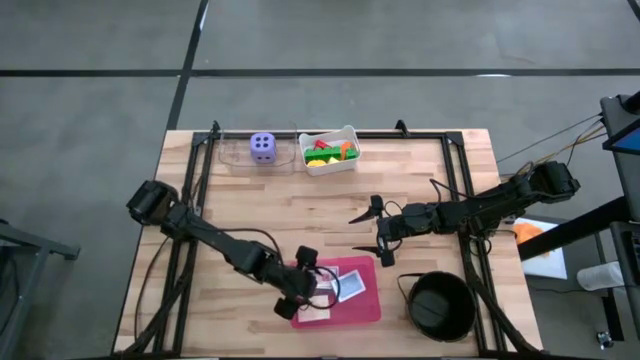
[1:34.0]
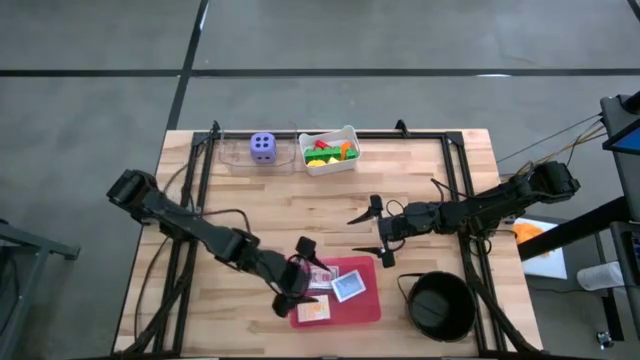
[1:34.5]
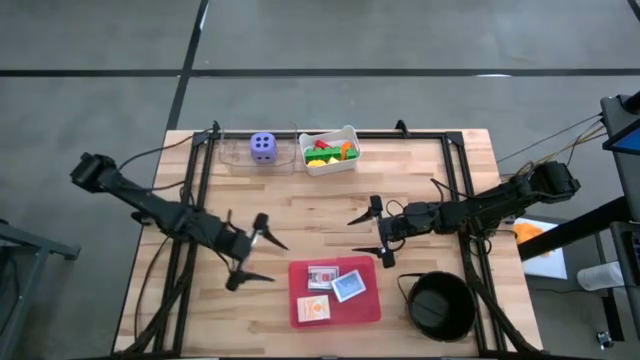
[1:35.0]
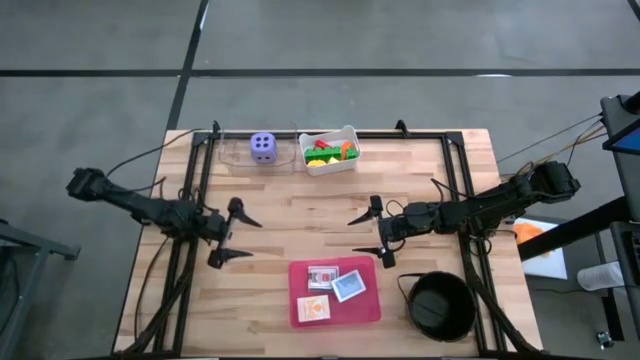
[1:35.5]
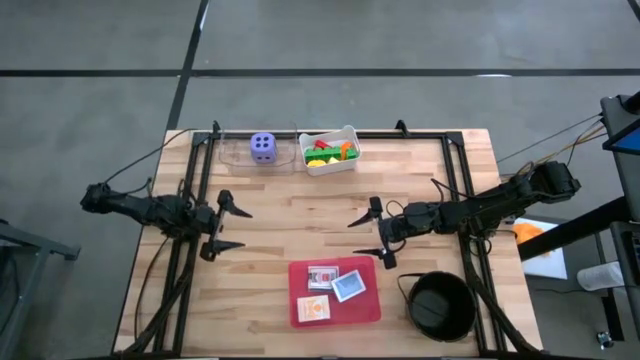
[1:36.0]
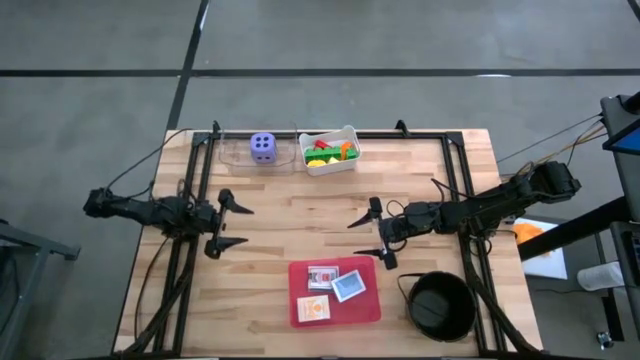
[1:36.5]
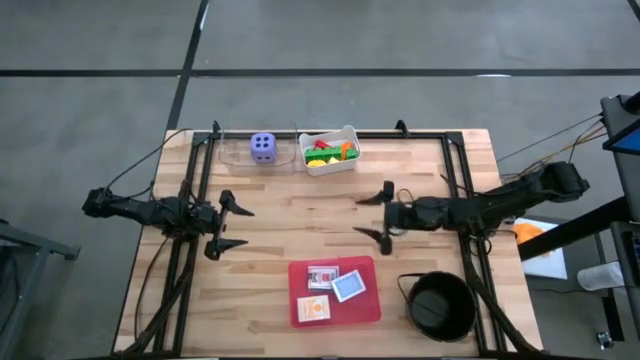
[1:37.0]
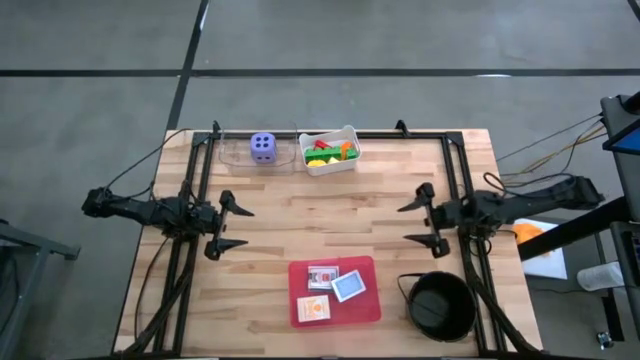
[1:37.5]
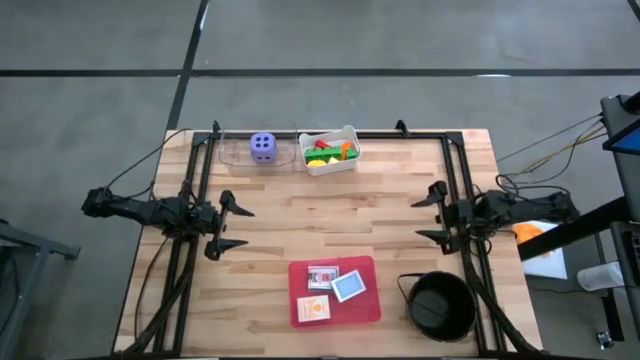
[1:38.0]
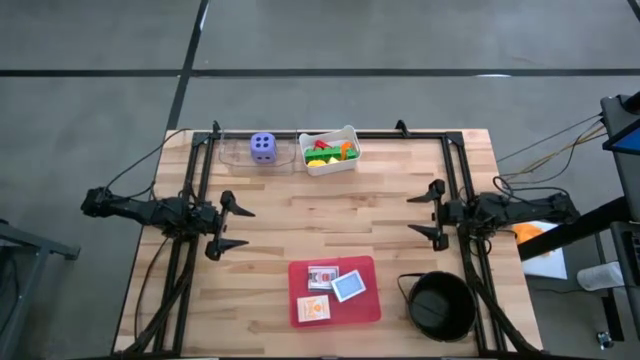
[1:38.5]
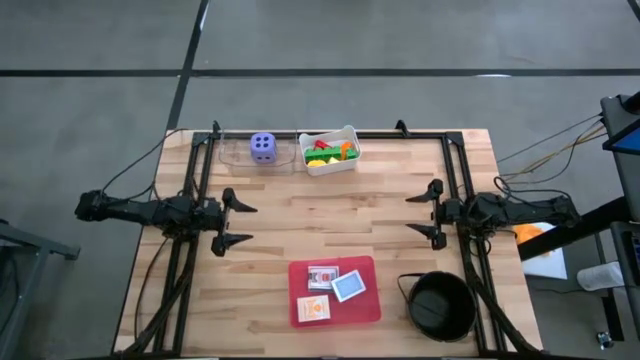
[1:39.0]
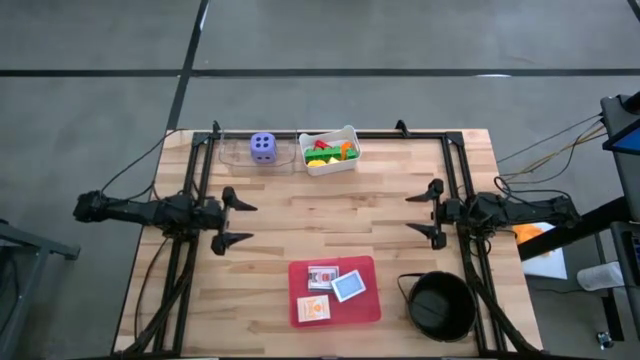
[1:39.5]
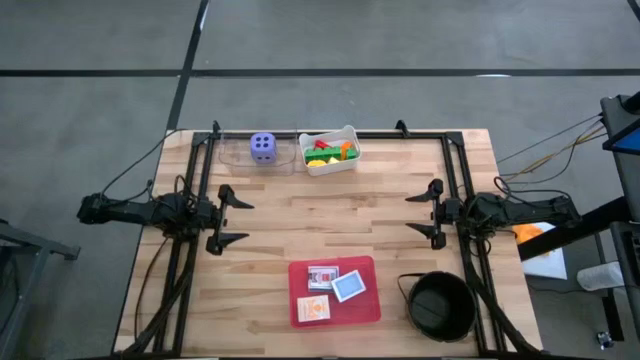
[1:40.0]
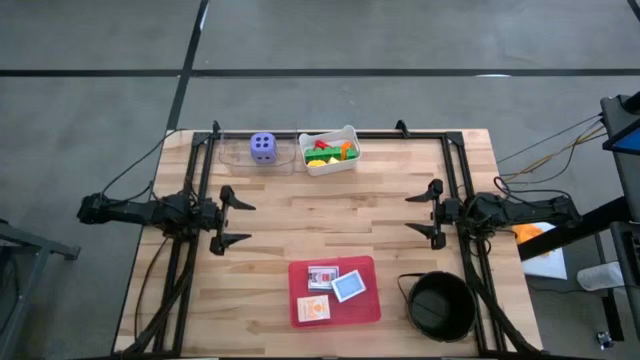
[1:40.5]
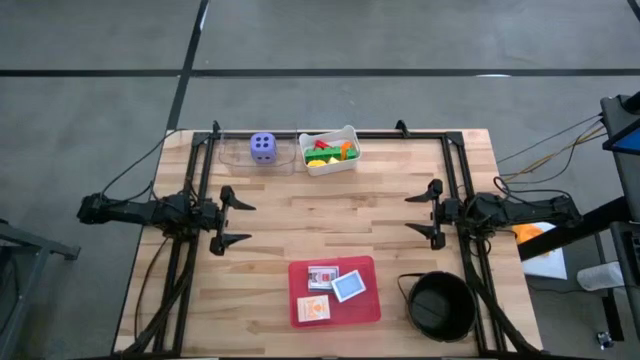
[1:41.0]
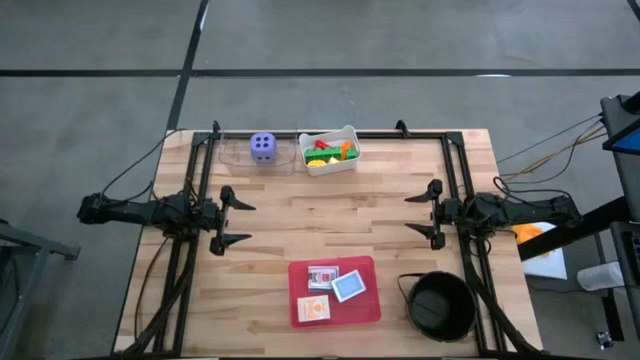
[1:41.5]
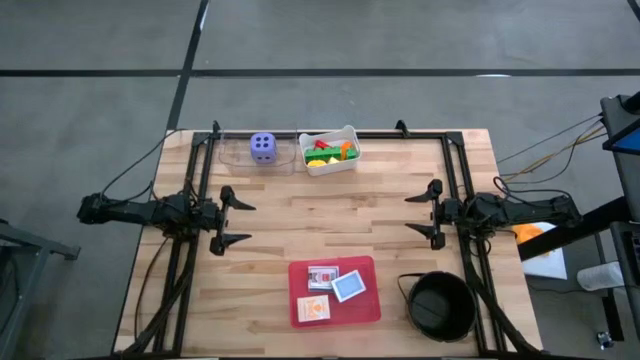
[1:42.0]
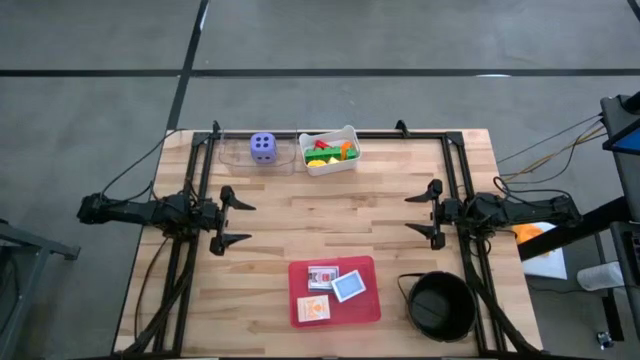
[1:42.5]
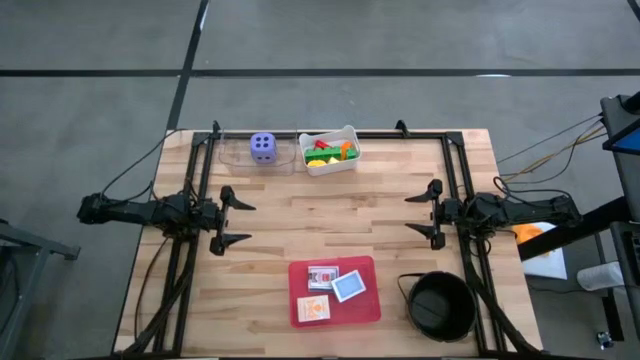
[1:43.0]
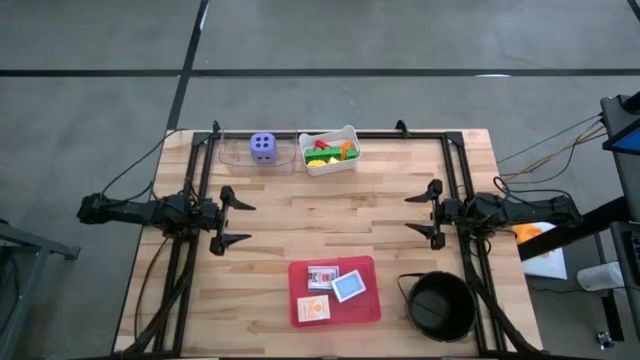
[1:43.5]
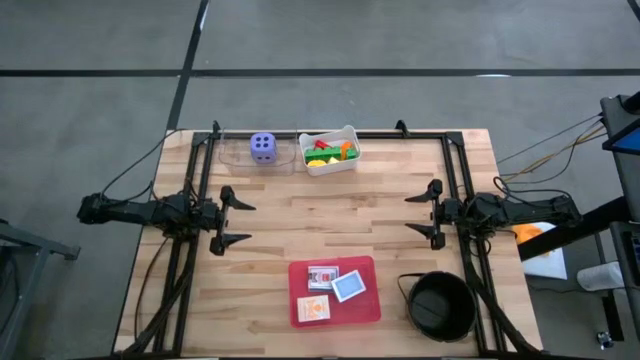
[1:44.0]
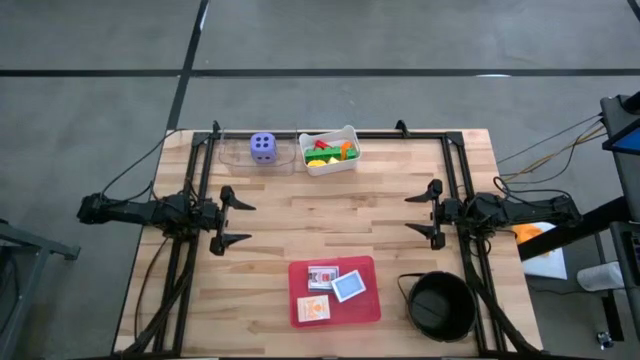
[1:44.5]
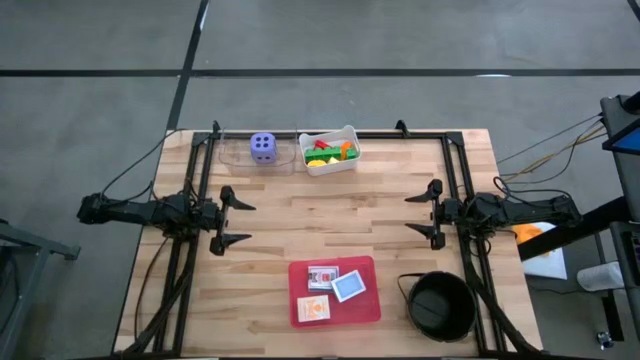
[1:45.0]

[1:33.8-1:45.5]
Task: Pick & Place Toys
Return to Home Position

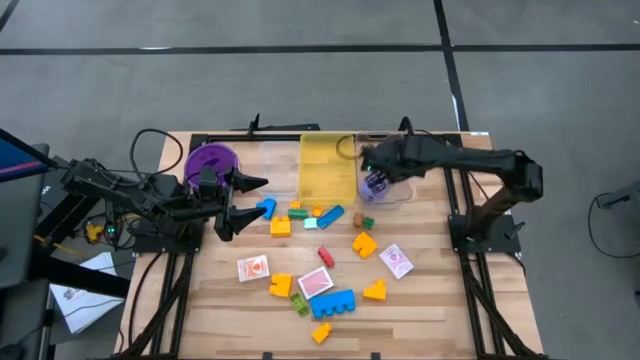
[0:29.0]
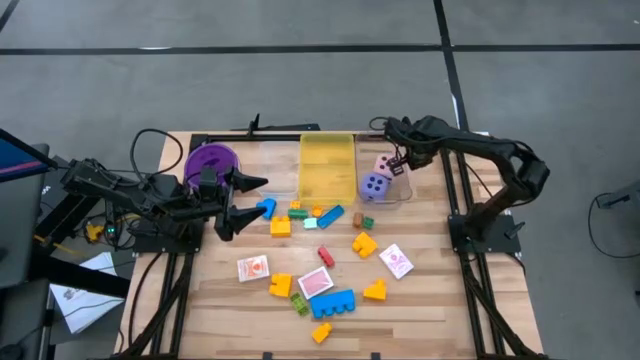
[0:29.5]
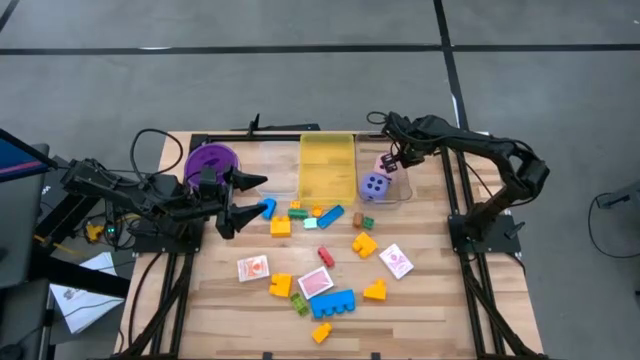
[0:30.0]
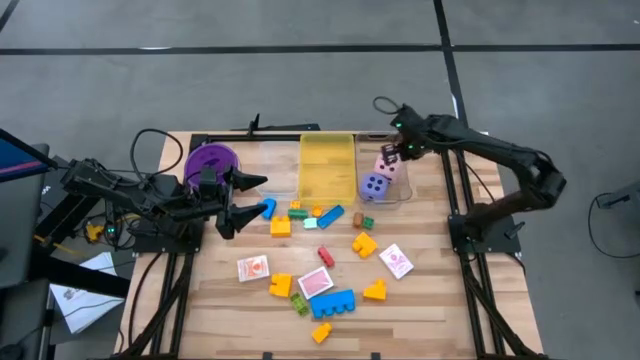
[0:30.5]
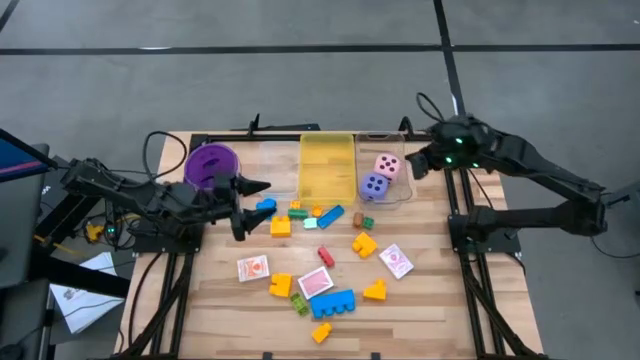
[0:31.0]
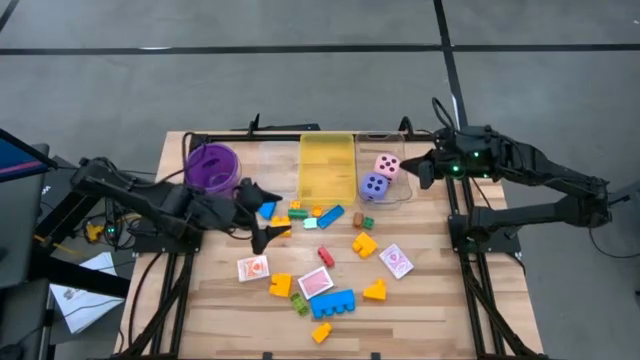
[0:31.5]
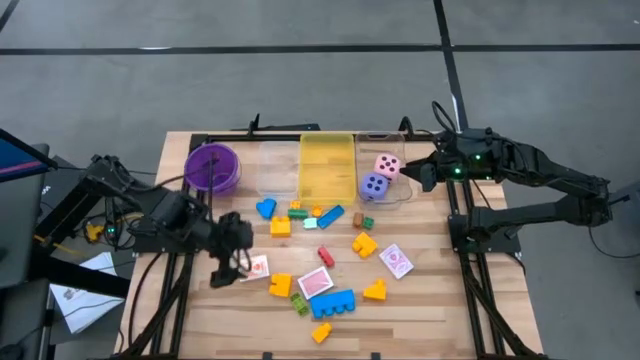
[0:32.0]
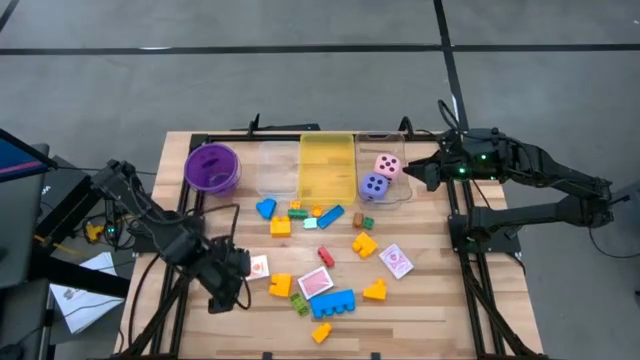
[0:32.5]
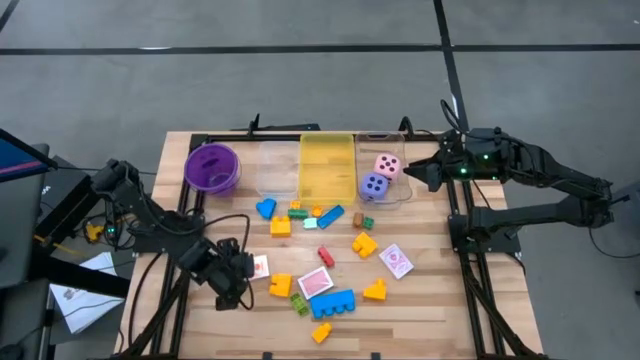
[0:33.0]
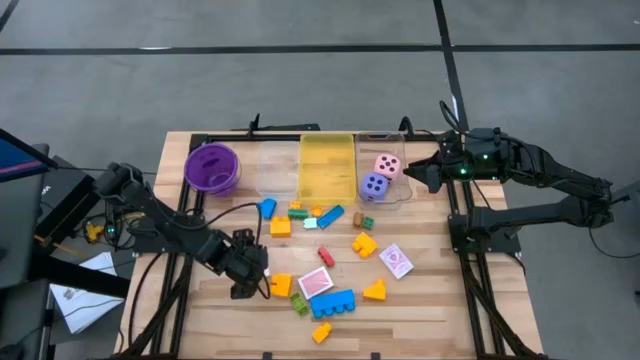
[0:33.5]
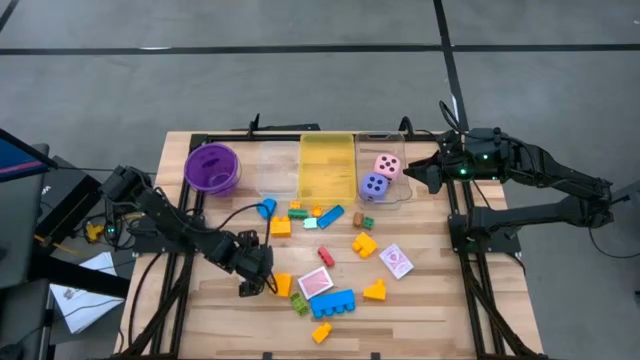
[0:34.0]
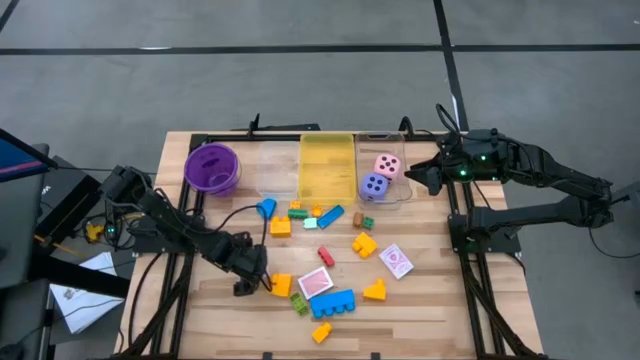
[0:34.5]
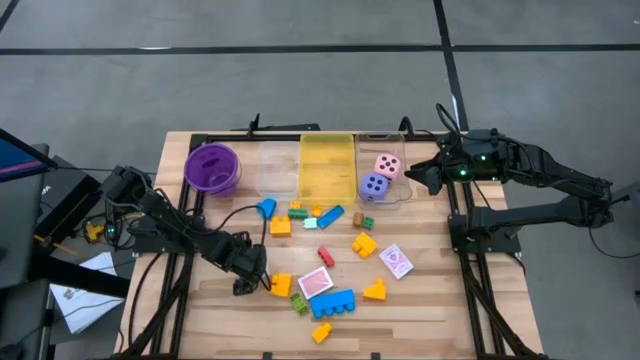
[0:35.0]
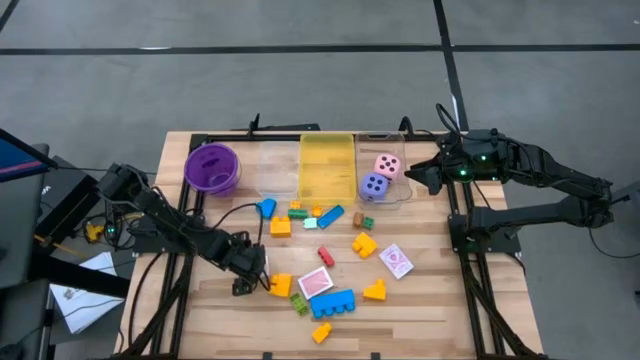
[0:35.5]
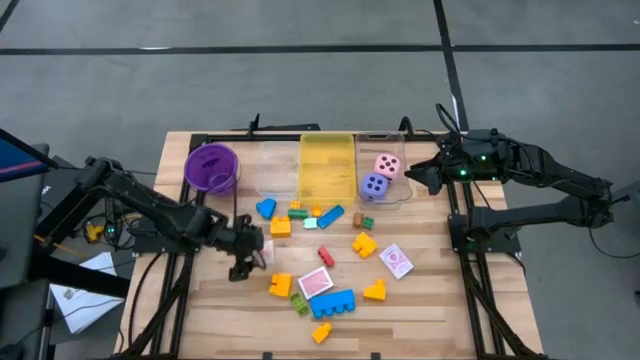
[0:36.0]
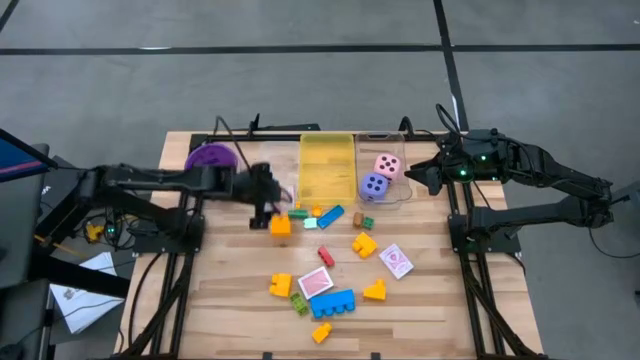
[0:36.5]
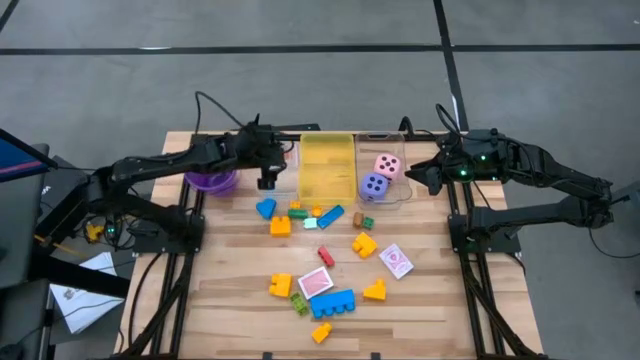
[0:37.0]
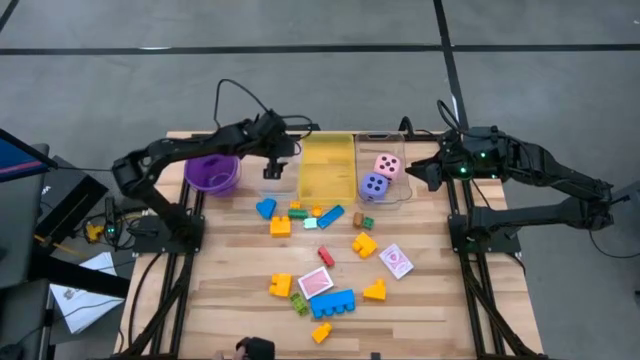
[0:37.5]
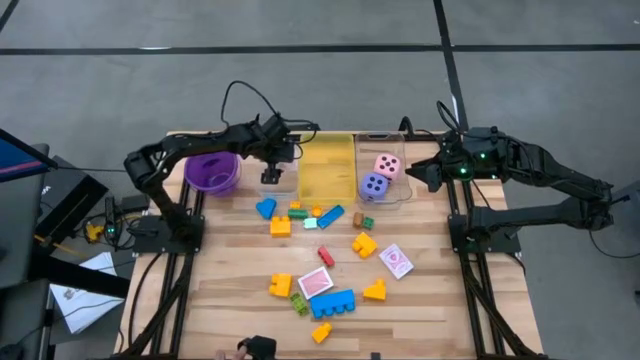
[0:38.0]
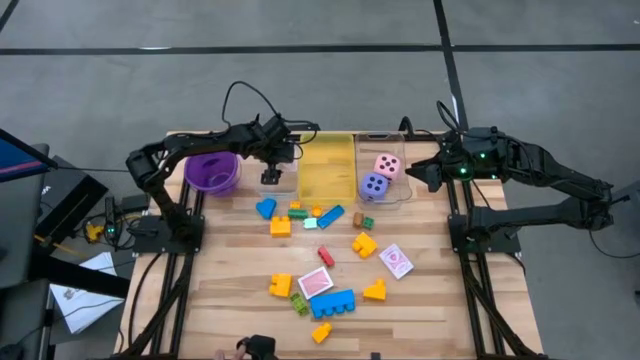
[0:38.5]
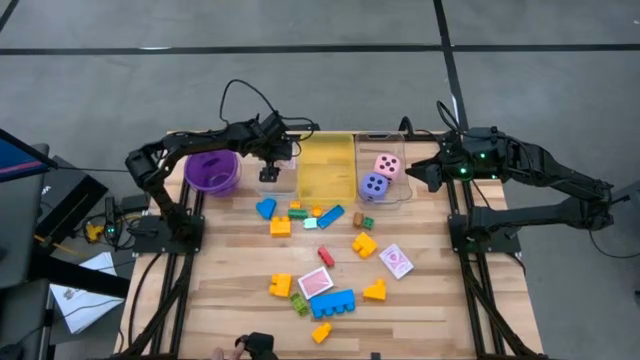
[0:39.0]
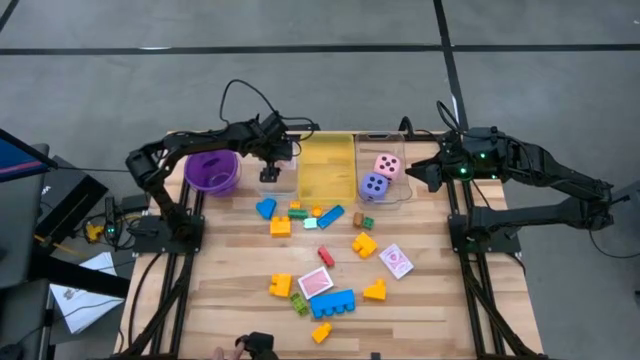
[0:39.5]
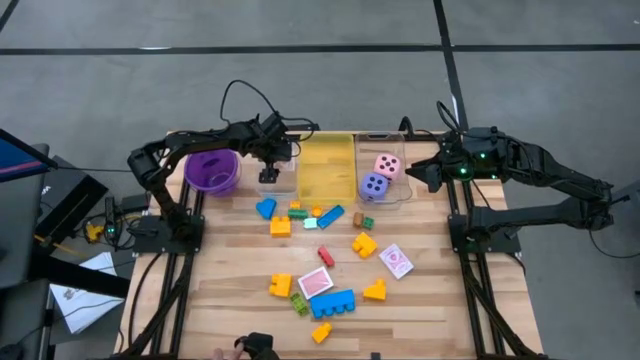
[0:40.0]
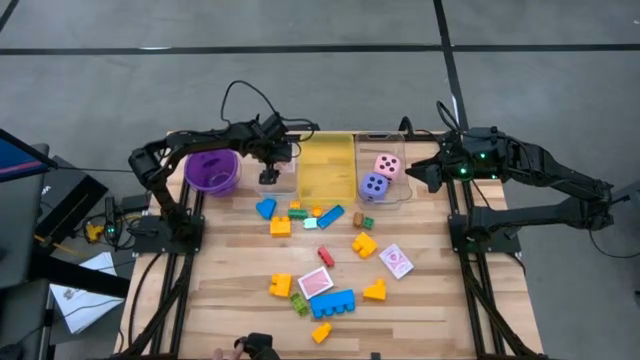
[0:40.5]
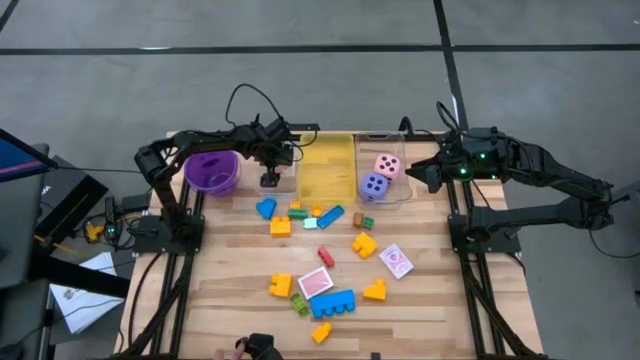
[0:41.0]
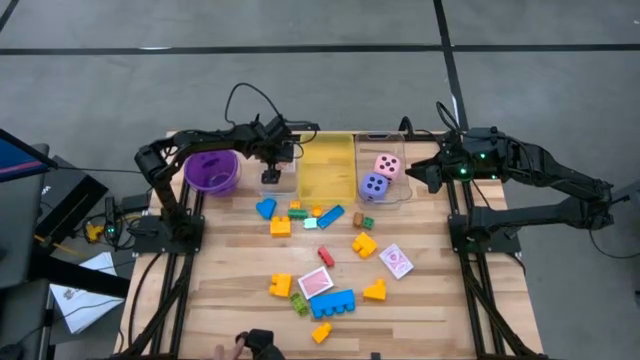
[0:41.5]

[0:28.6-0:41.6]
Task: Pick & Place Toys
Put the orange deck of cards into the white bin
